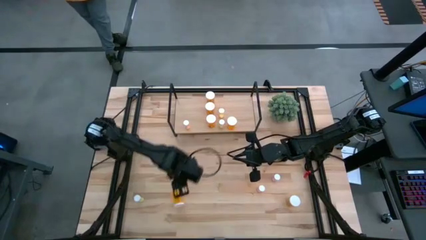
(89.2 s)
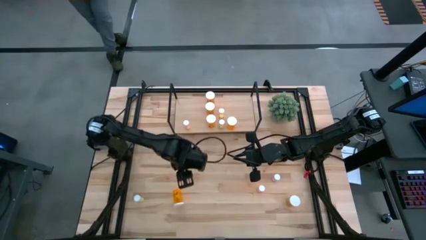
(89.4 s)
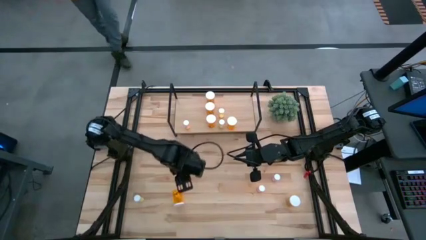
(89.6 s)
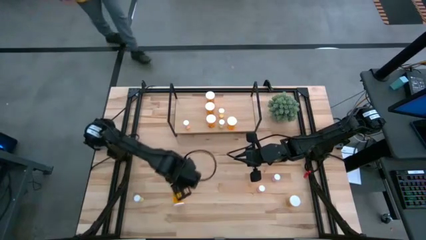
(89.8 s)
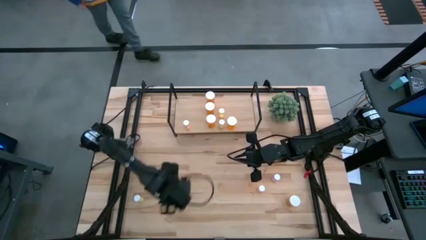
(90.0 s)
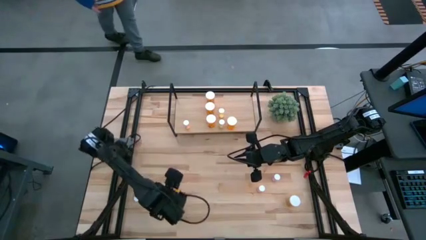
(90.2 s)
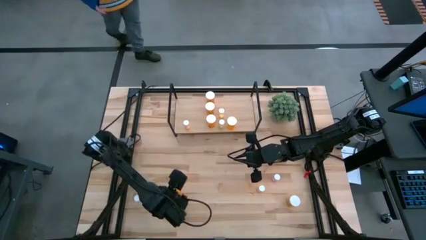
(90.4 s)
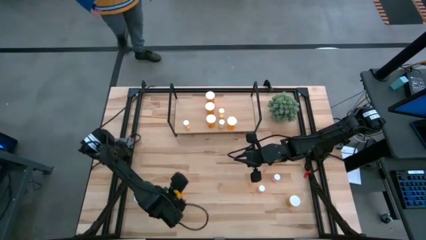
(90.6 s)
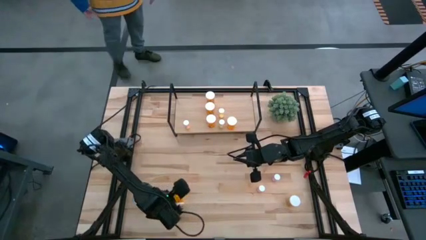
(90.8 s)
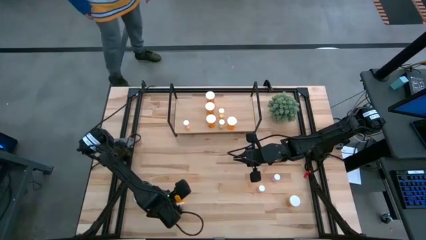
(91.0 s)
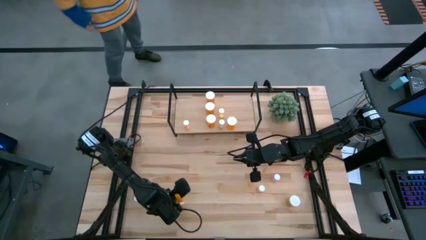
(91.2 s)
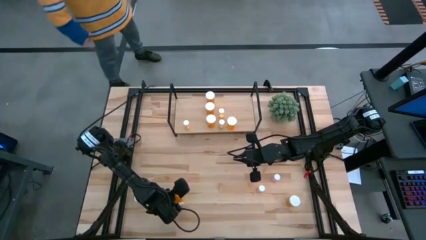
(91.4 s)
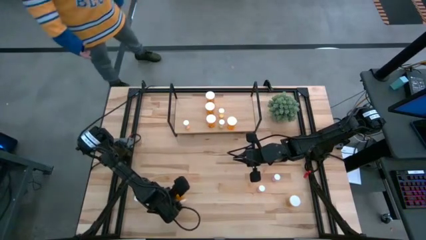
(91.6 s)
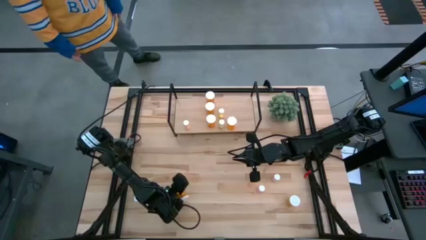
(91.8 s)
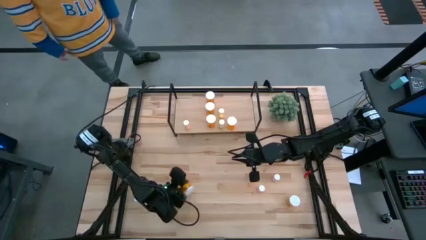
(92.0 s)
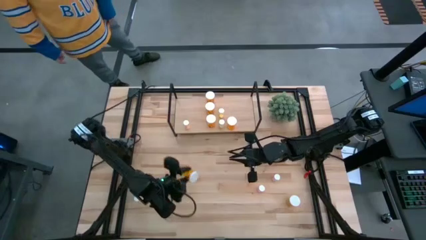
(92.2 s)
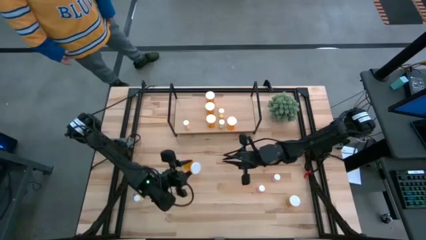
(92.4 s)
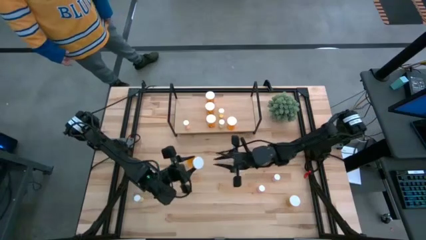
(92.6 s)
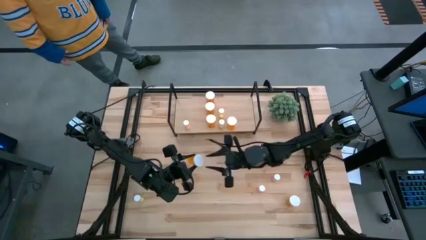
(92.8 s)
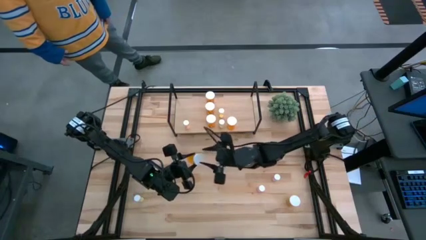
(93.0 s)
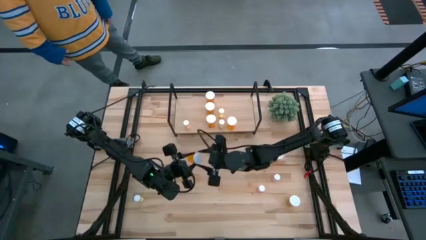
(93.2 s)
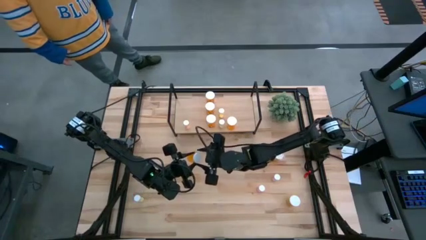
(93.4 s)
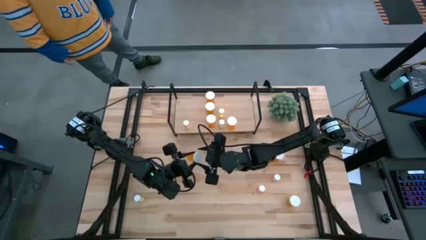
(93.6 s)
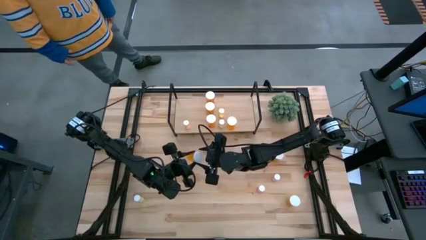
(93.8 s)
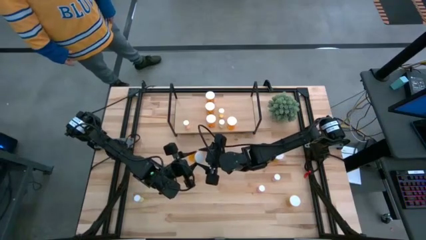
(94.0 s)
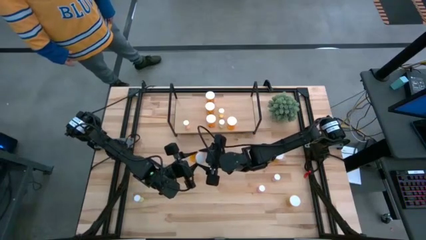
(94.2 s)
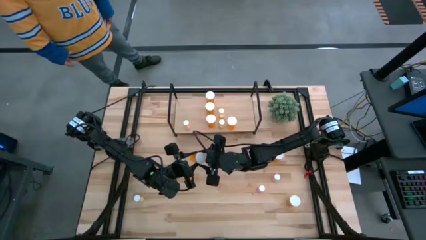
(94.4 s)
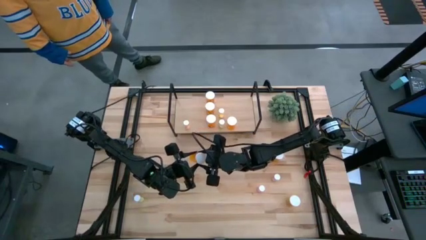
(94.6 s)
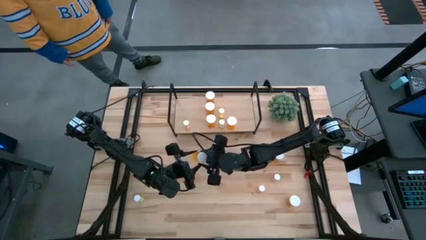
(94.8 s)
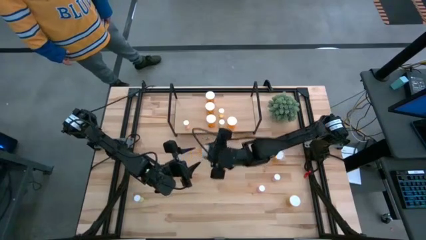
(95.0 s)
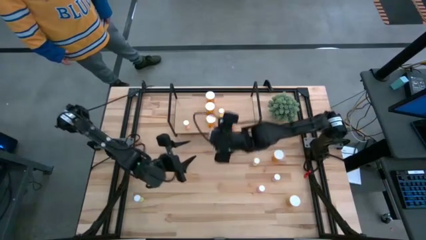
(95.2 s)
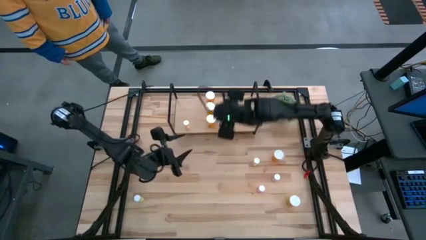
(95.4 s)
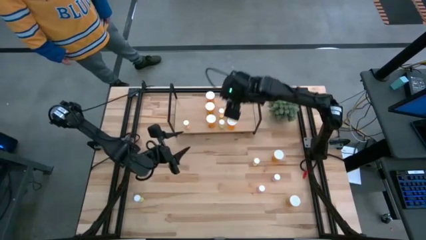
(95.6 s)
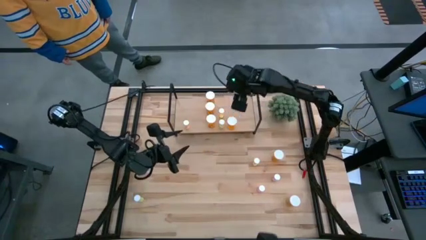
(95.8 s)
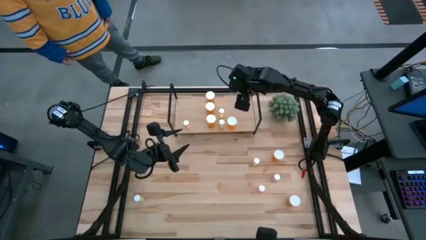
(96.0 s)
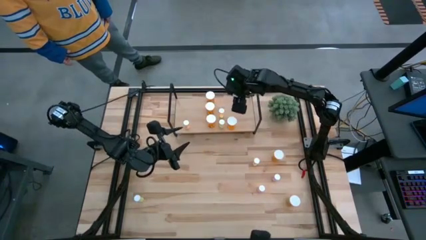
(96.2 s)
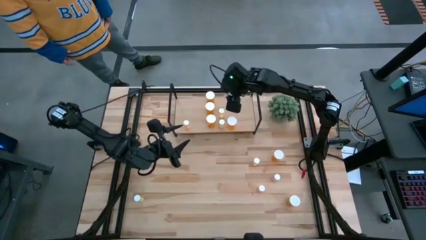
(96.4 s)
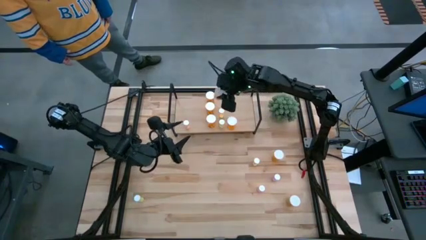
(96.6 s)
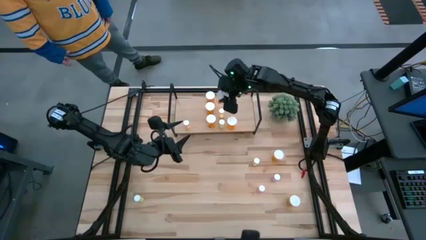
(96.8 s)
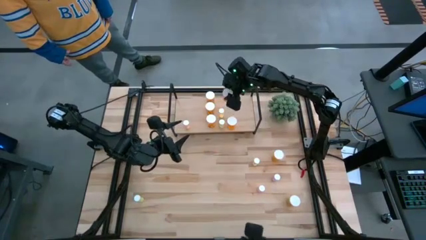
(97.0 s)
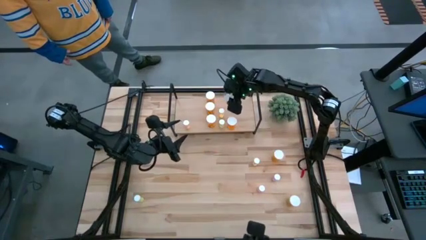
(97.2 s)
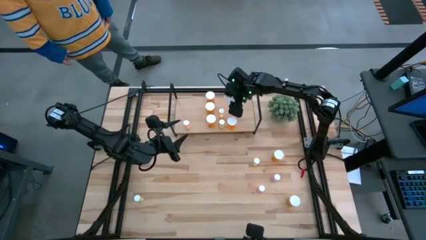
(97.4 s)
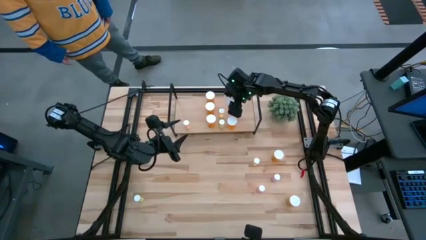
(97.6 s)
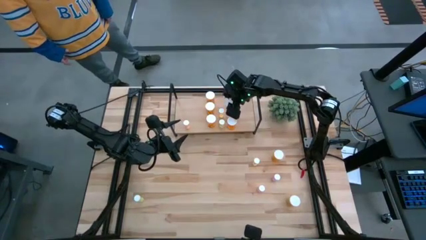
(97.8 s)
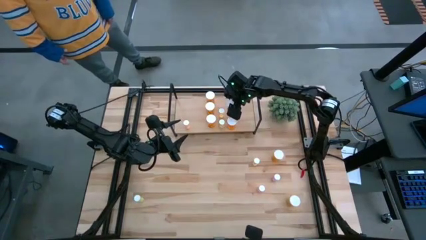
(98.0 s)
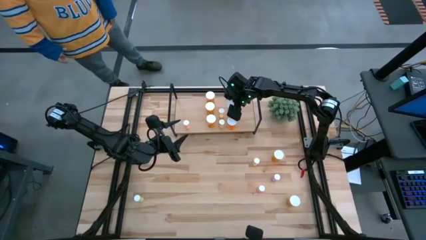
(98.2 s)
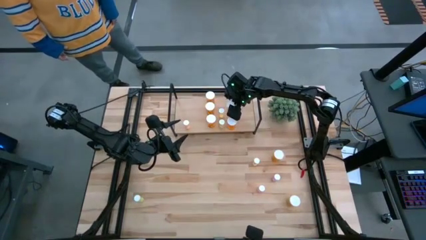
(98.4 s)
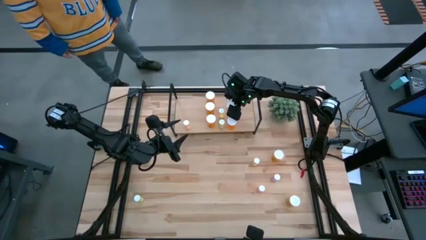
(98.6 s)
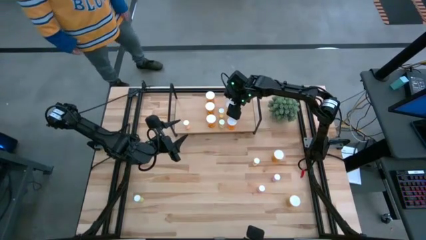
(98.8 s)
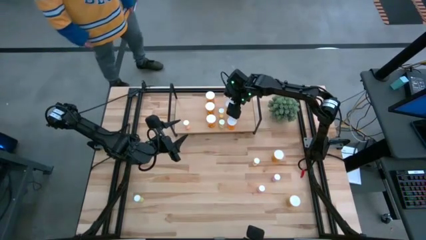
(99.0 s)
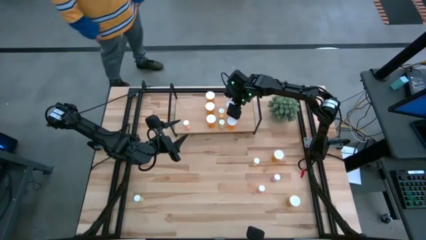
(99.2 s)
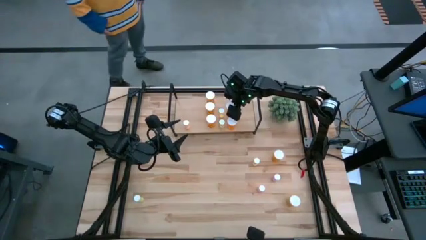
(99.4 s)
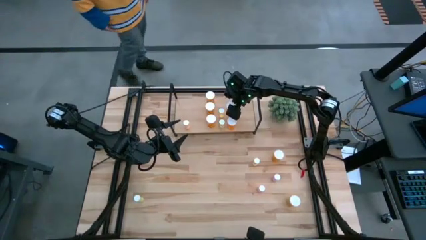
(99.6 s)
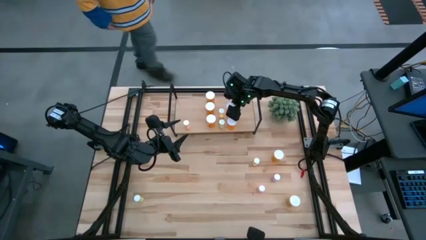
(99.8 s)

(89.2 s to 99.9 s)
Task: Pick and place medicine bottles onto shelf by color
Put the large orange pill bottle on the shelf aligned with the other large orange pill bottle

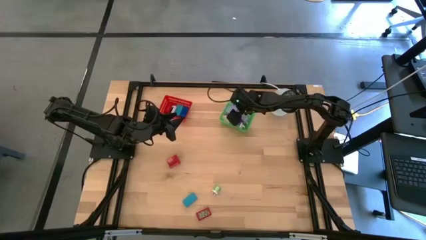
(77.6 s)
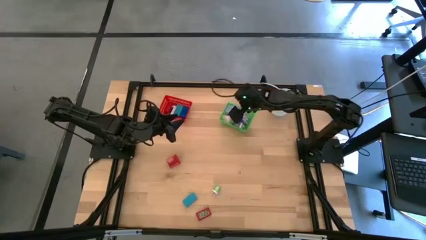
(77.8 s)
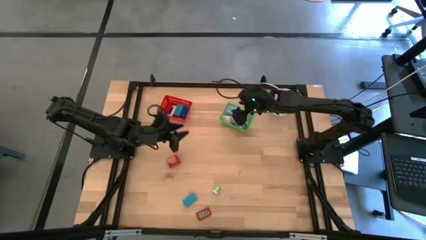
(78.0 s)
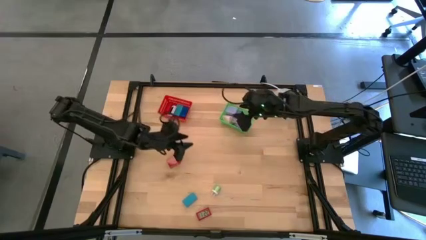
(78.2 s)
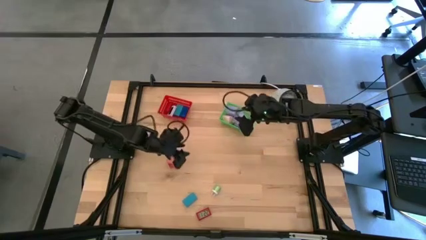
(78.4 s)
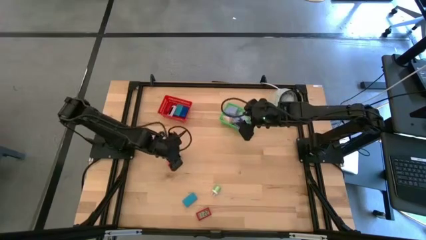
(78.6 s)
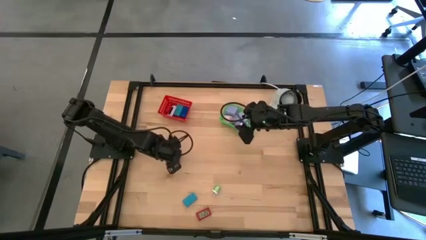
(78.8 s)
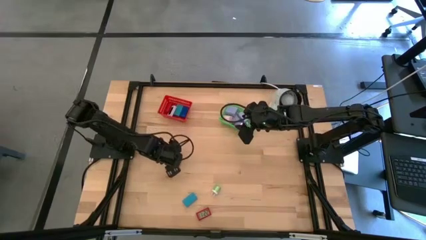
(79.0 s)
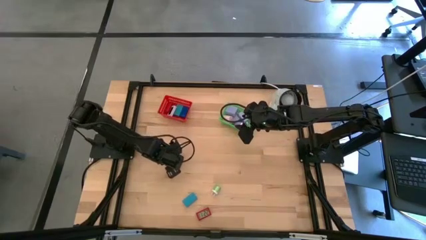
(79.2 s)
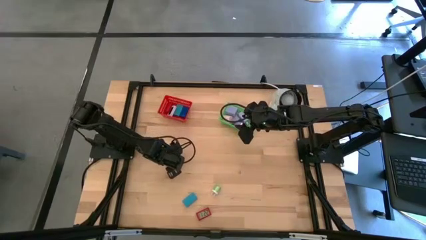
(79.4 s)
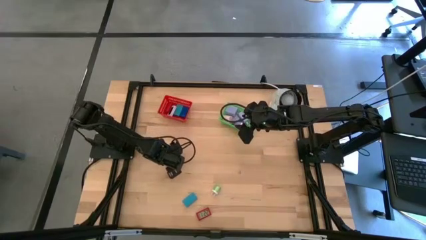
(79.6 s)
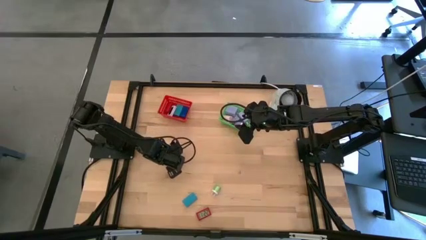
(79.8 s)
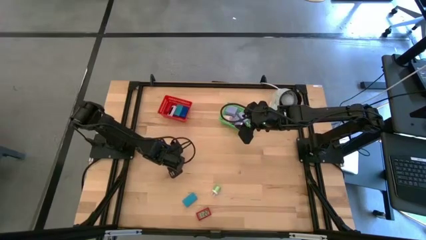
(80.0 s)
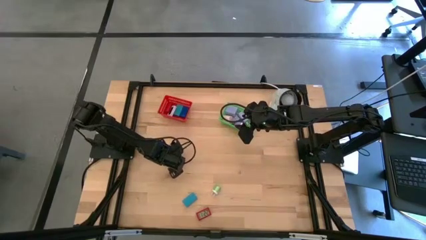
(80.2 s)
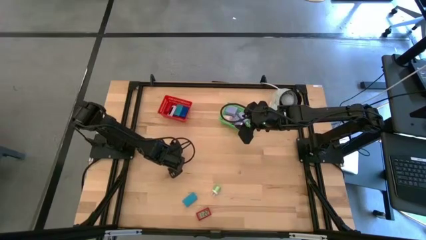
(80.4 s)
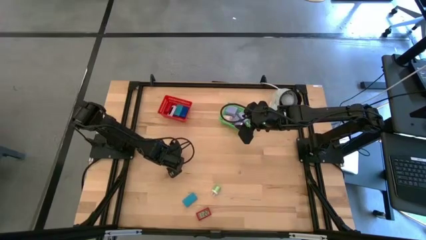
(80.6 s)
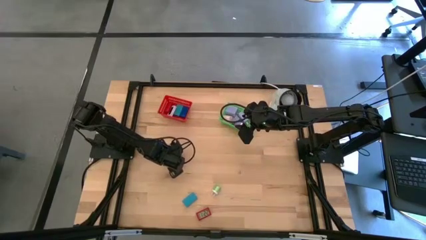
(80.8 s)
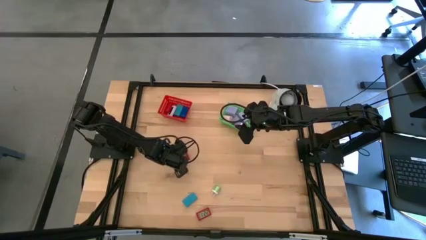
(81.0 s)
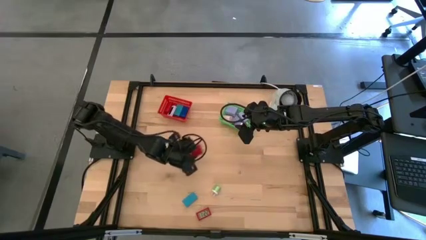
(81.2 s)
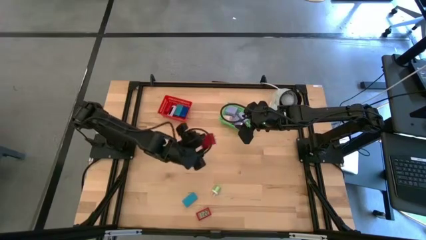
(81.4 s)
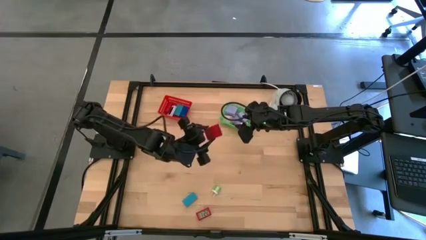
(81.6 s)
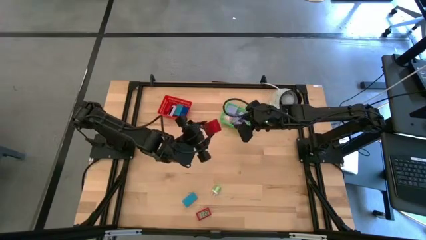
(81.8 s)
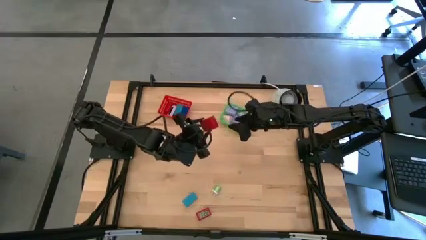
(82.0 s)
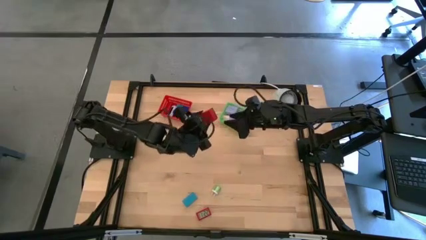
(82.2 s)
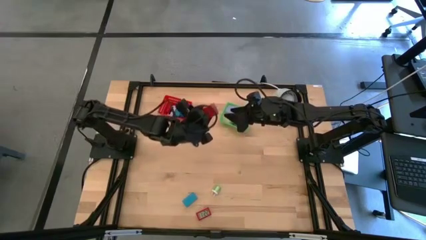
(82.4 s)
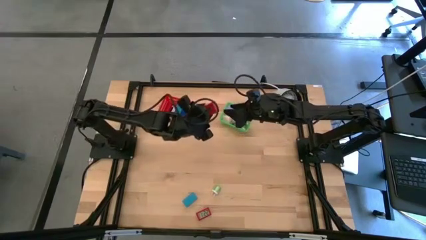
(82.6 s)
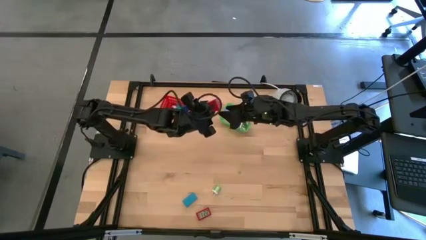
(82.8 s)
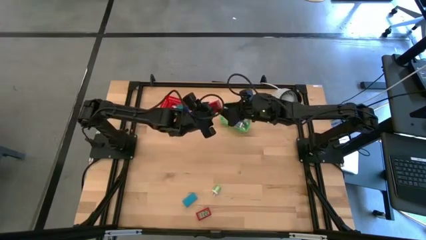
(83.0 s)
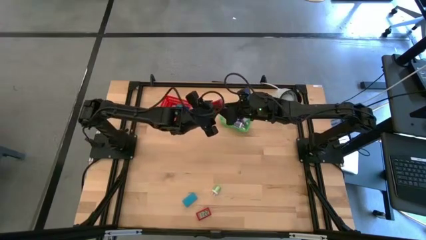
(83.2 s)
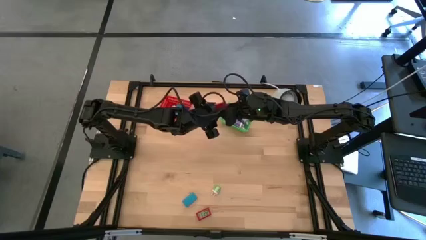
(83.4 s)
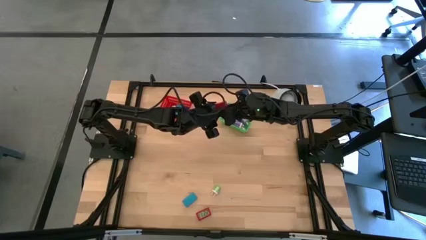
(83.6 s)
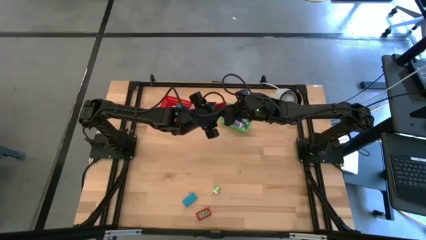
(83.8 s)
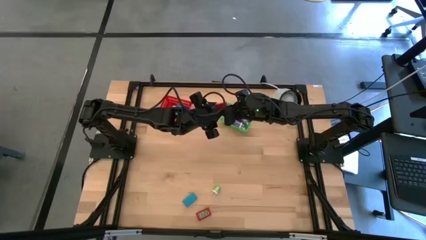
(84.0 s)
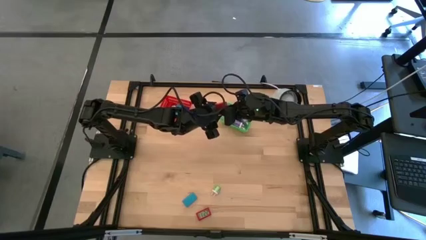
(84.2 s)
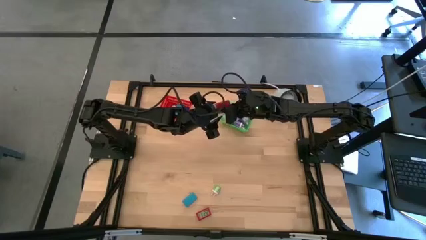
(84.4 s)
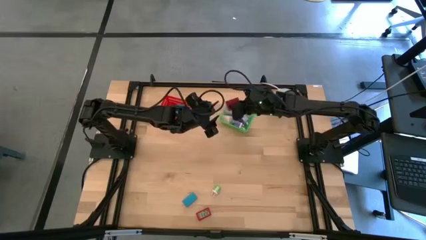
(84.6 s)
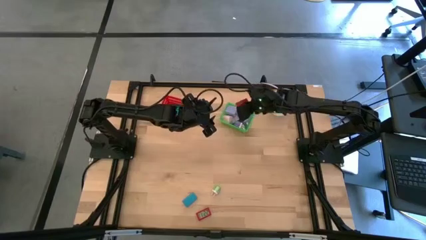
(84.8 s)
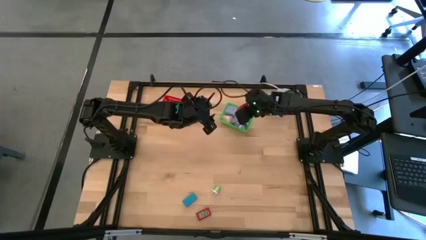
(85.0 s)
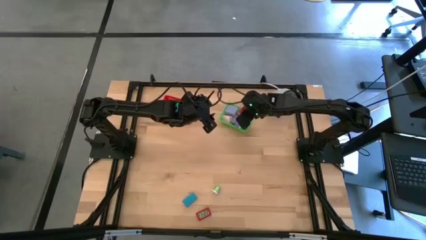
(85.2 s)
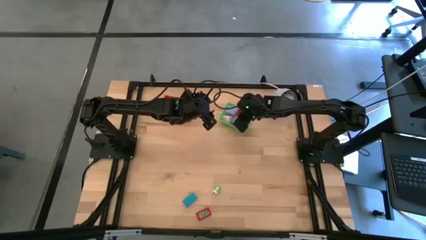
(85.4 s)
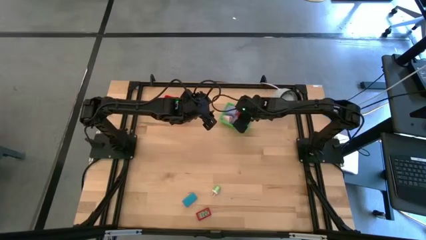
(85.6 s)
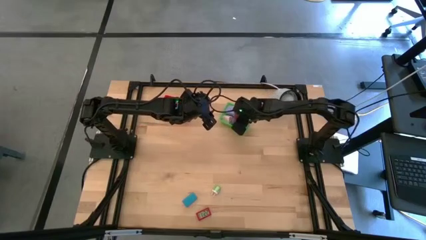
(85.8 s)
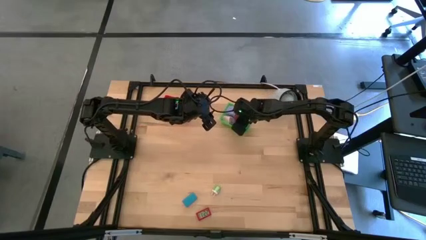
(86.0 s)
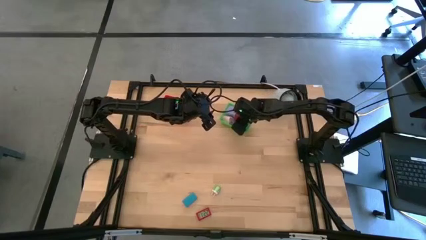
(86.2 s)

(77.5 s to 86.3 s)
Task: Pick & Place Office items
Put the red charger adapter into the green bin
